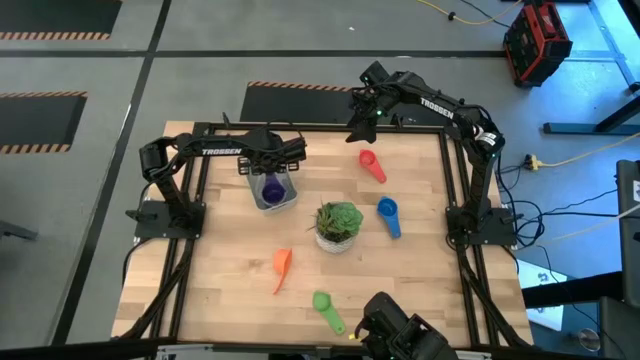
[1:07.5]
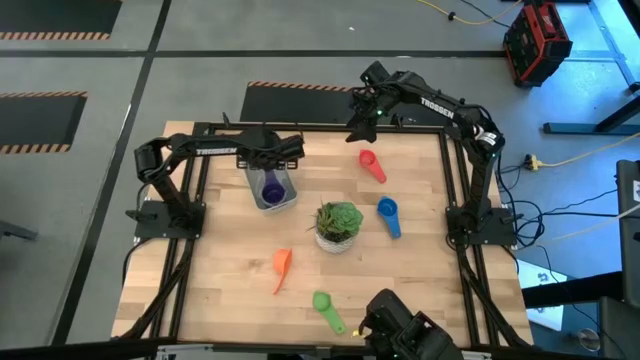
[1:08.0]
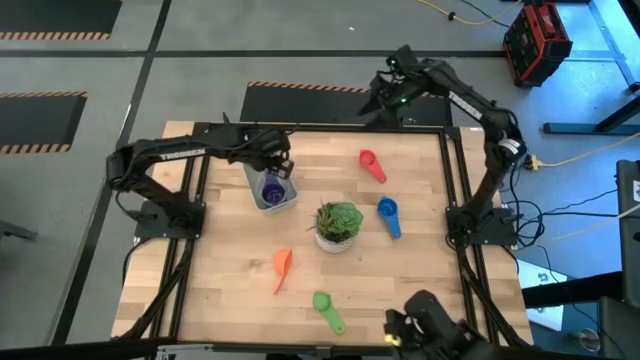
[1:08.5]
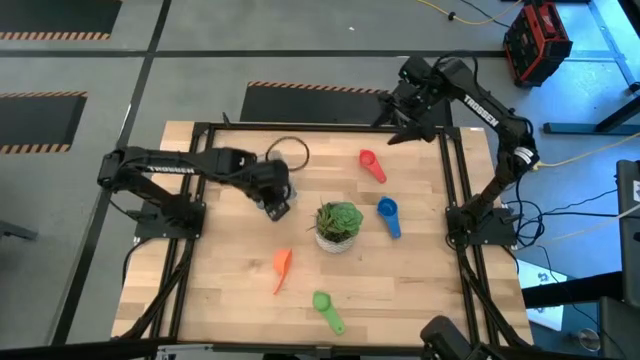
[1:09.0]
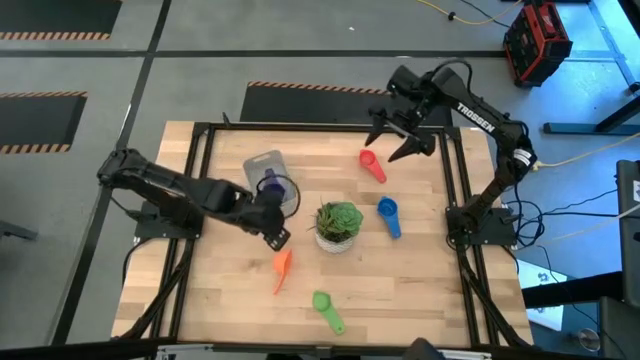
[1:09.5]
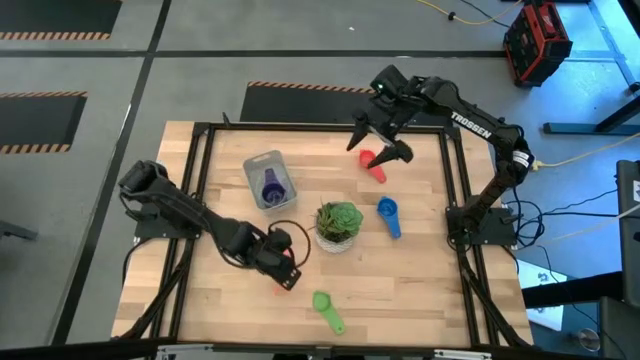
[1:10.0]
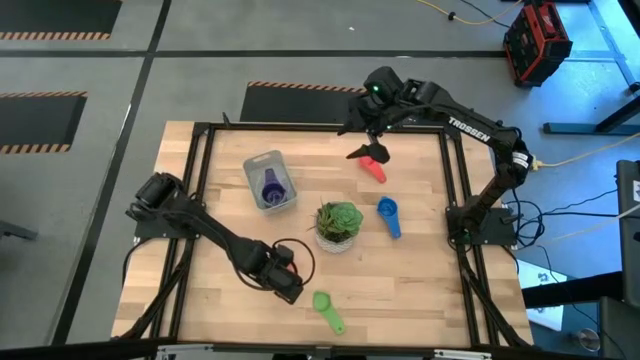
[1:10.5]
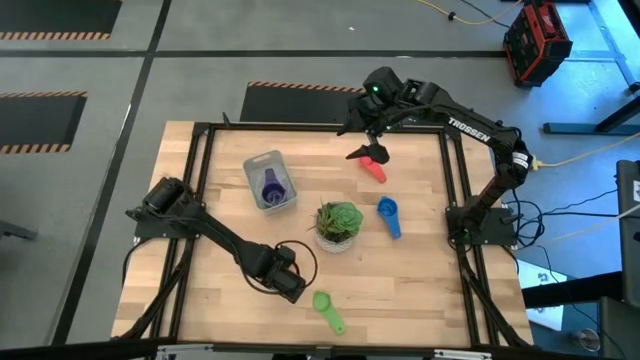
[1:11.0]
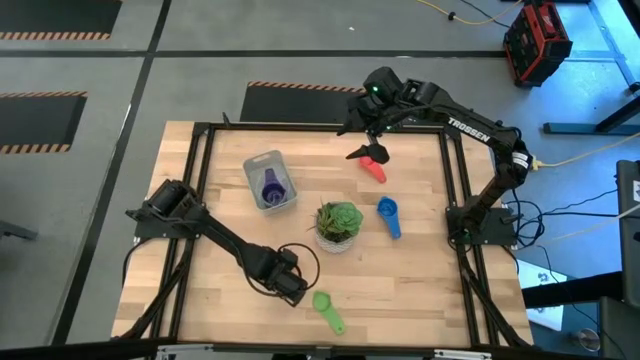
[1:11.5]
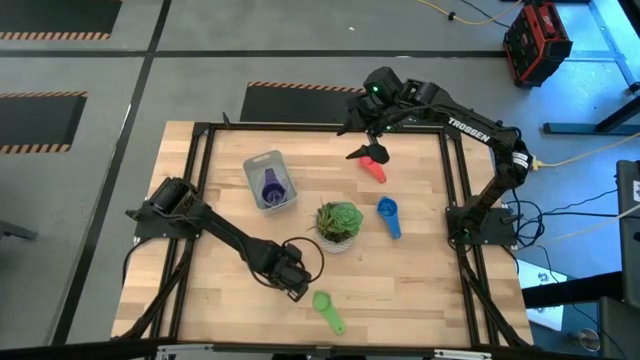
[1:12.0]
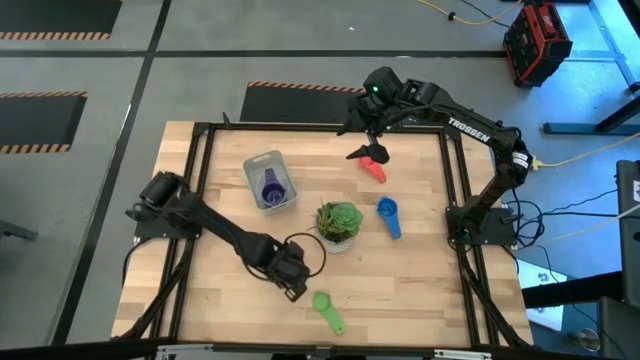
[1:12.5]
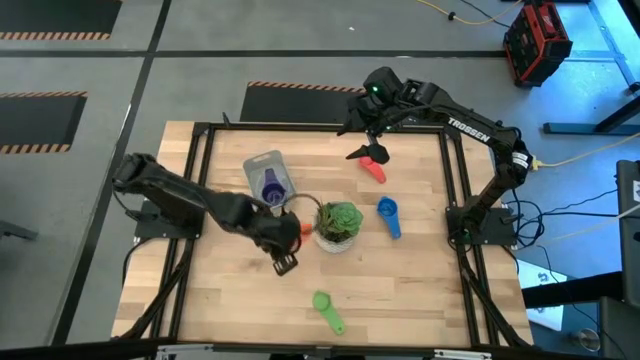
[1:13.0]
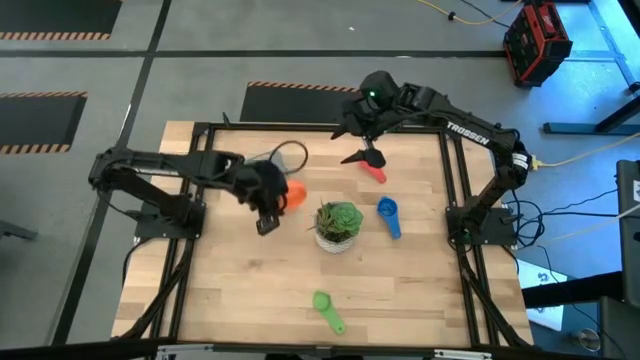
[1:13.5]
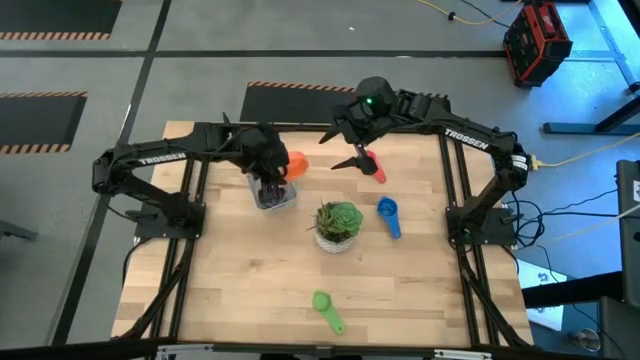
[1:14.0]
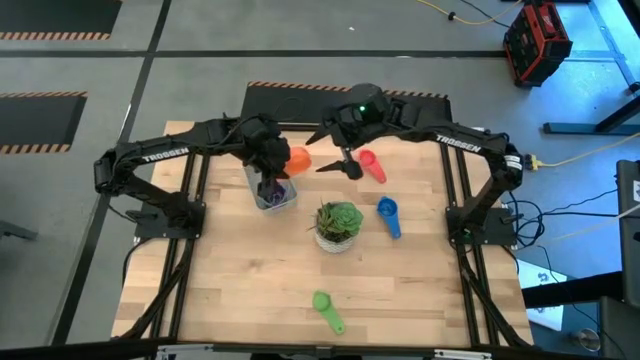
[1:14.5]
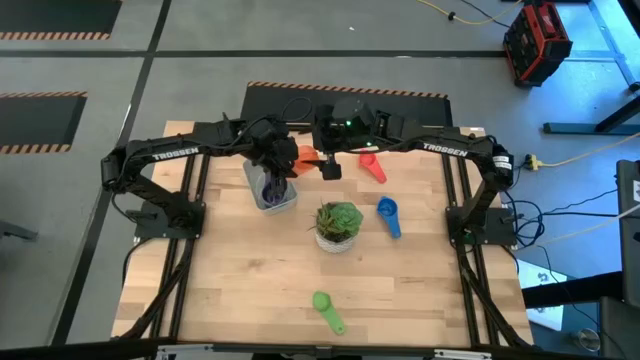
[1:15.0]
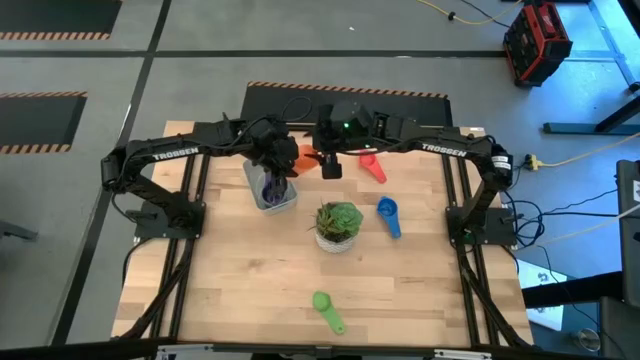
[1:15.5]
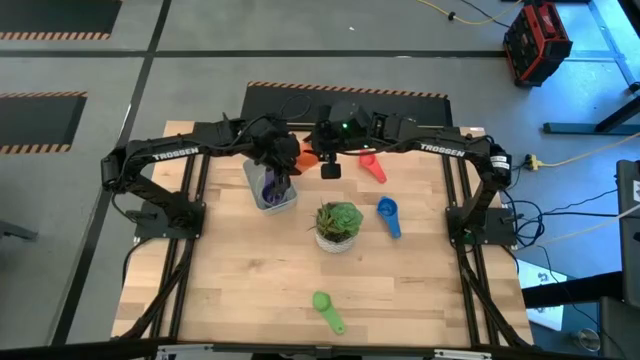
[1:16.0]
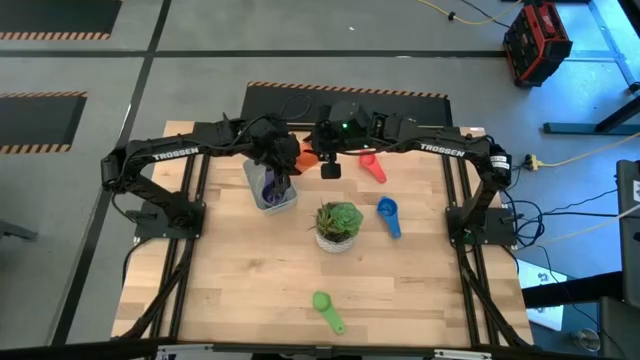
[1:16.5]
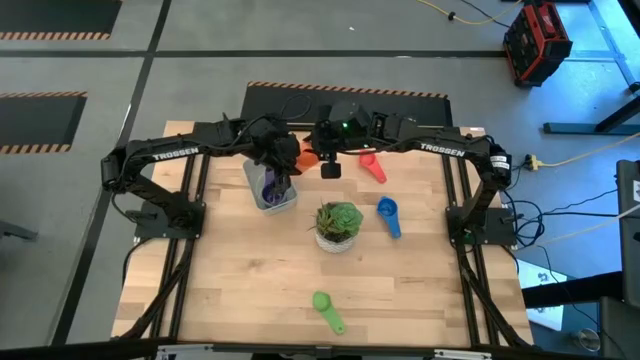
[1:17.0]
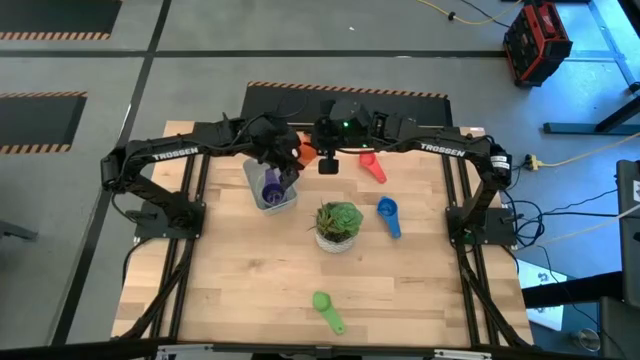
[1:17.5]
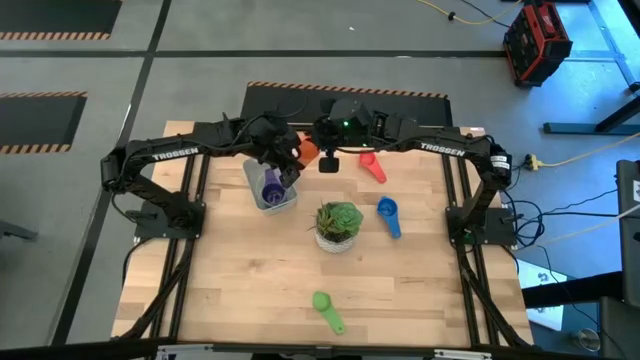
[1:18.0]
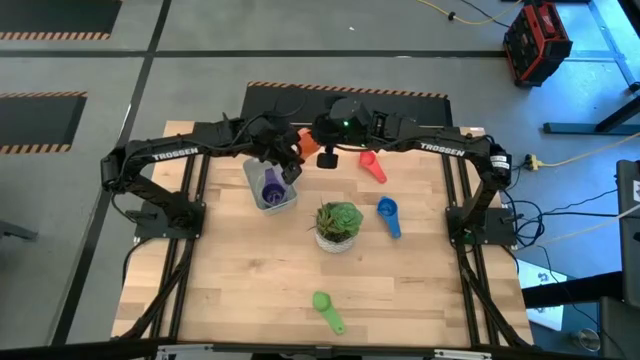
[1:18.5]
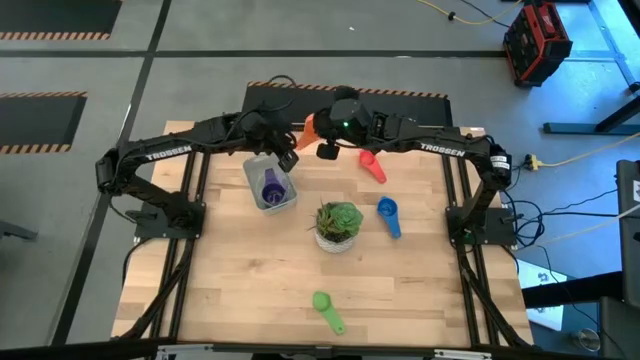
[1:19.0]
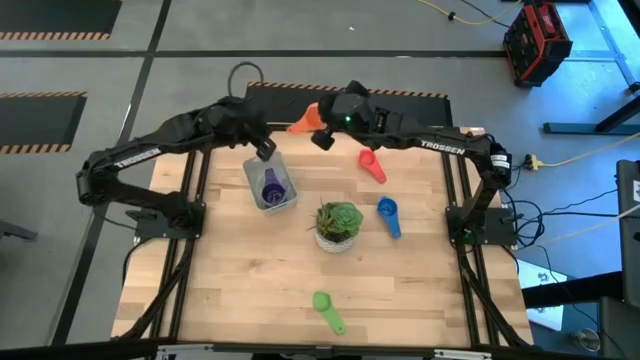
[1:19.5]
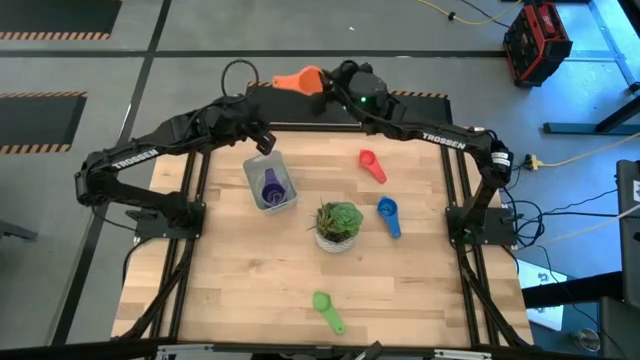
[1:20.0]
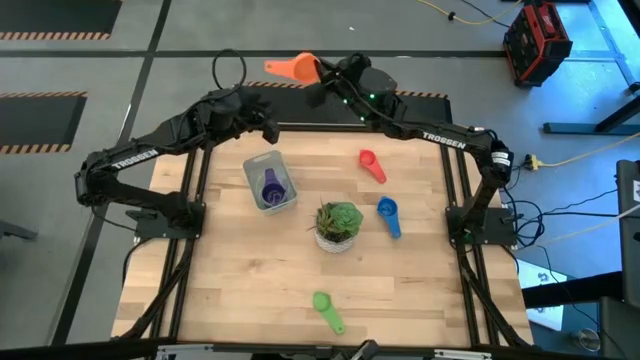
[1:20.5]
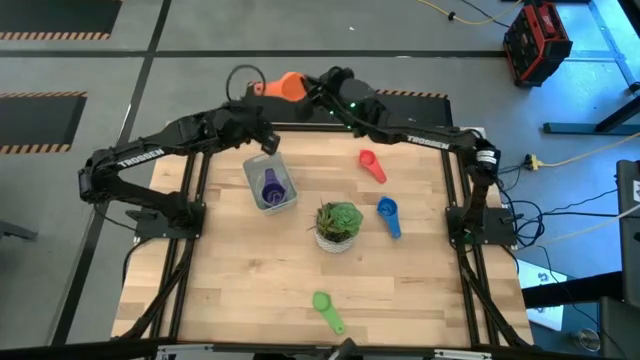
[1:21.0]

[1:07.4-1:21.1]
Task: Nest measuring cups in basket
Stack the orange measuring cup on top of the violet measuring cup in the gray bin

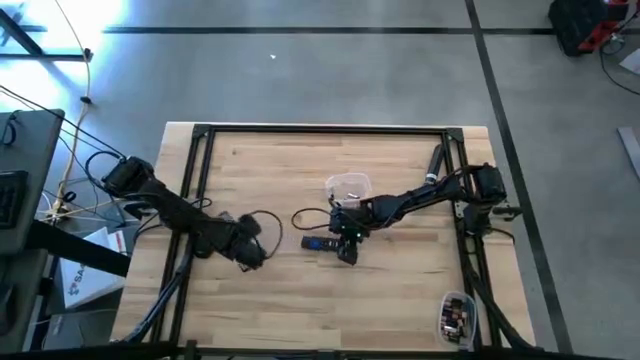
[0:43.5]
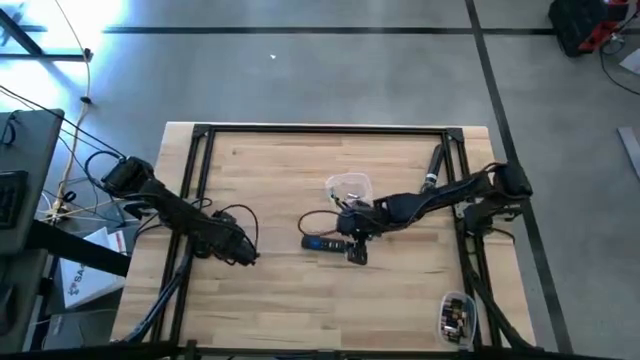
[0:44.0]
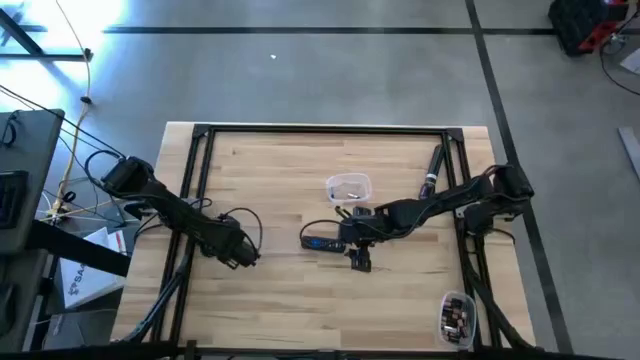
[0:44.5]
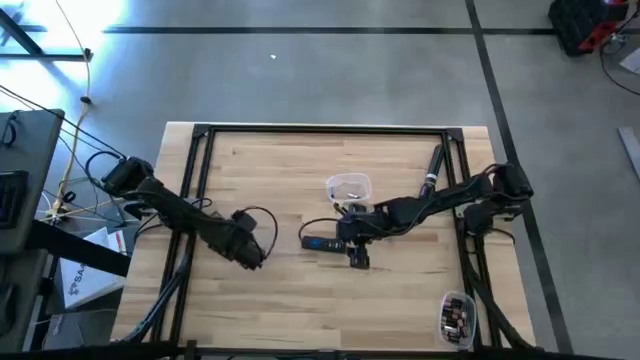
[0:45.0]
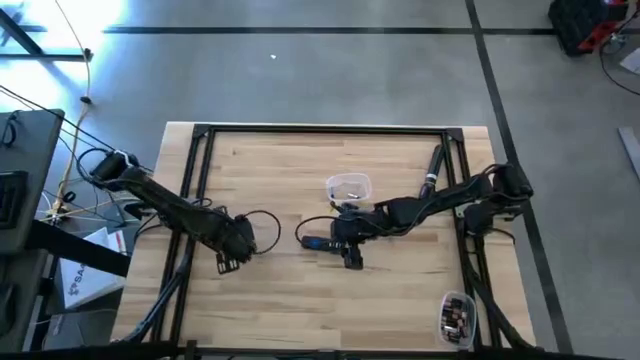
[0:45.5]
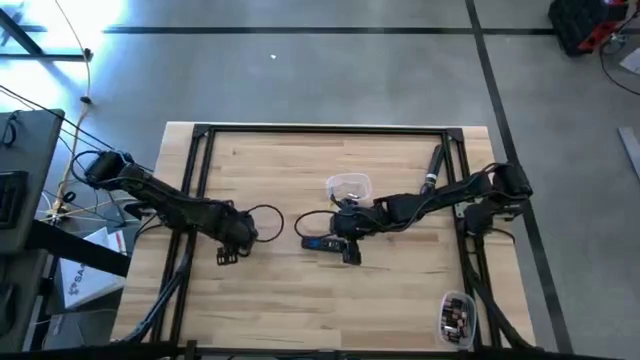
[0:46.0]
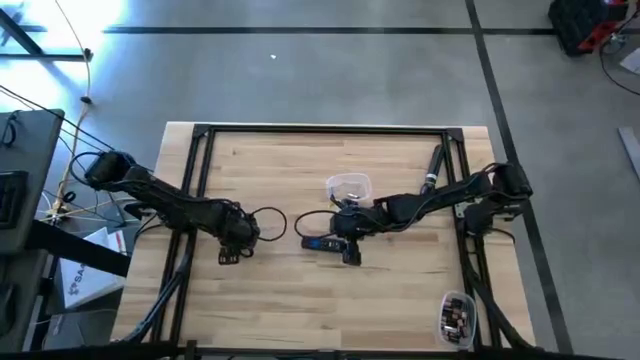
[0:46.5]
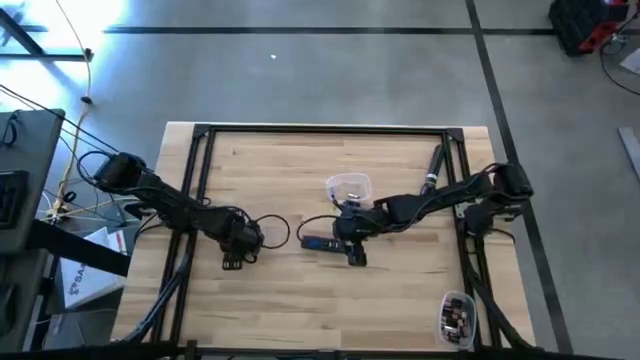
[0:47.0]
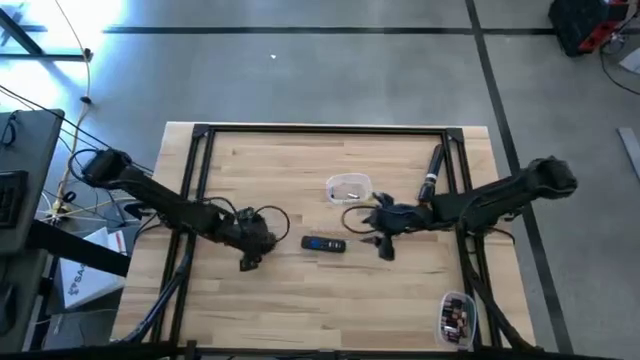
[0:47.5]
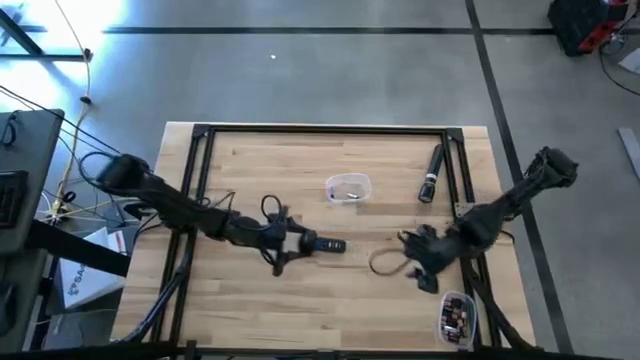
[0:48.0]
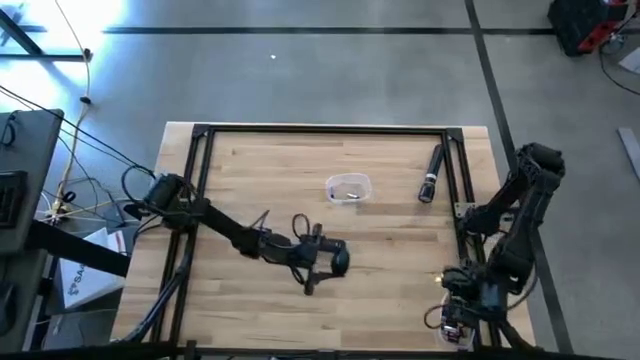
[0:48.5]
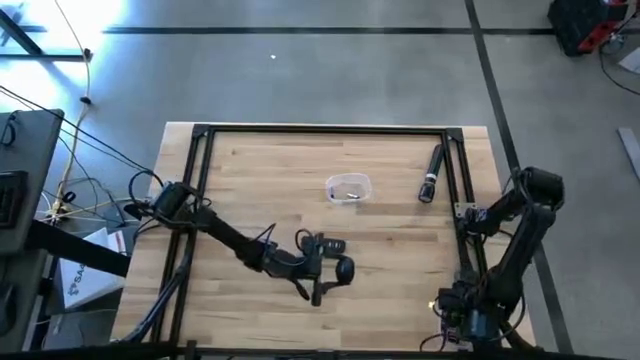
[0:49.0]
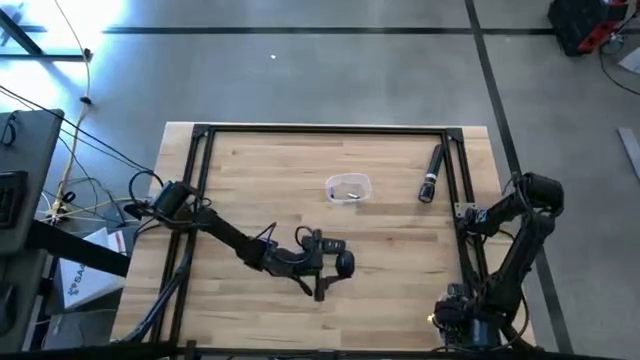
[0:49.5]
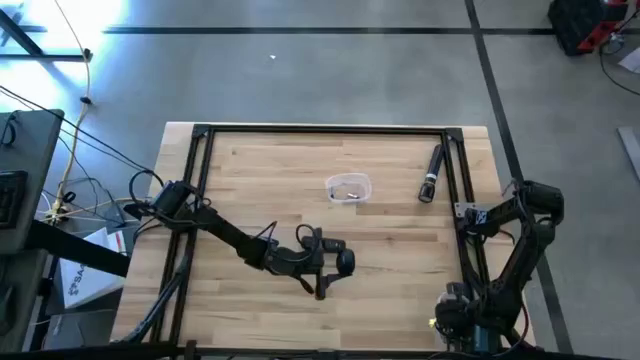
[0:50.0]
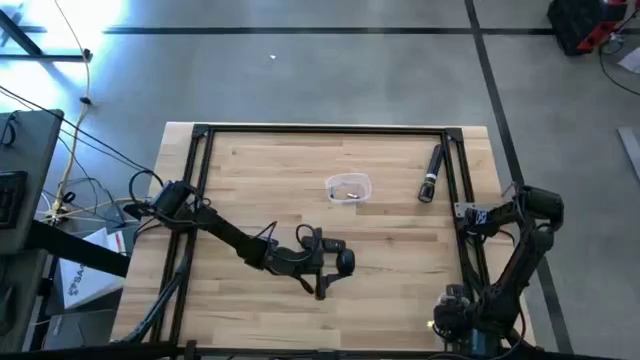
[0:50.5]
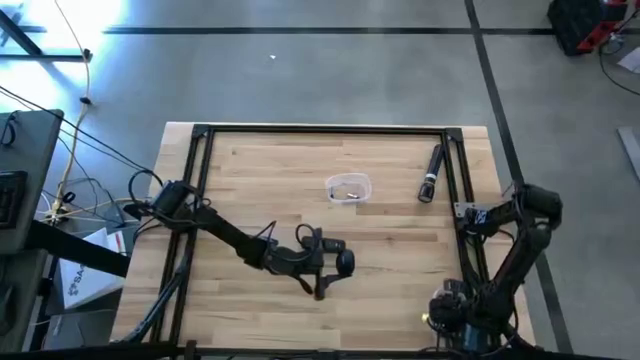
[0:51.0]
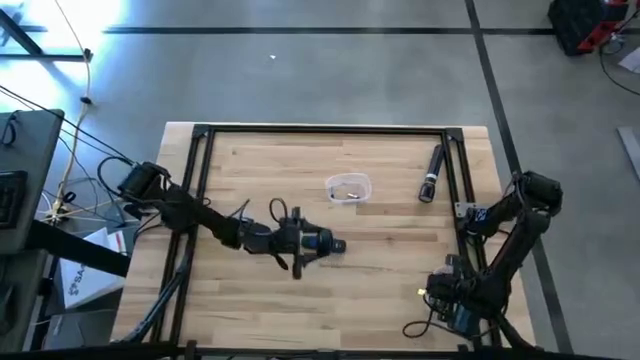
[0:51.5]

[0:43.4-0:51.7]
Task: Insert battery
Insert the black battery into the computer mouse
